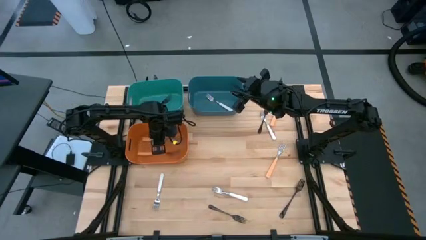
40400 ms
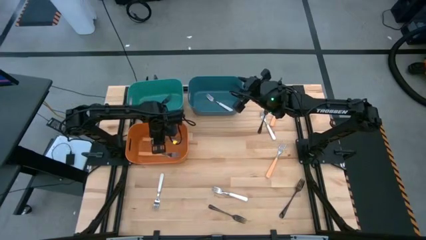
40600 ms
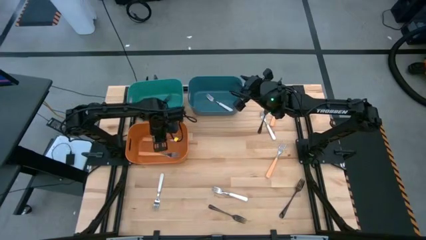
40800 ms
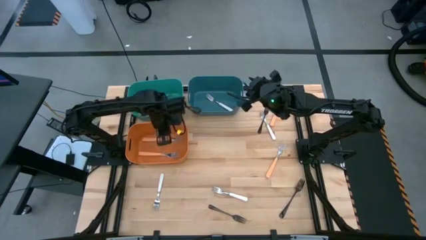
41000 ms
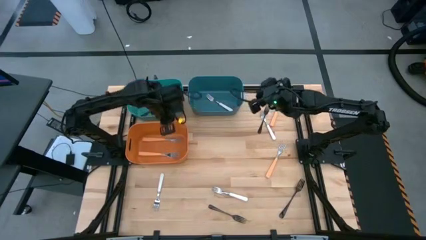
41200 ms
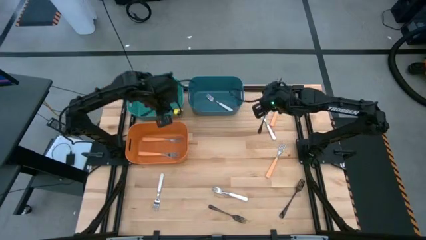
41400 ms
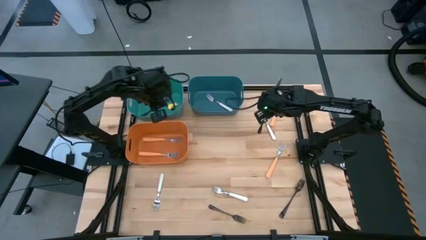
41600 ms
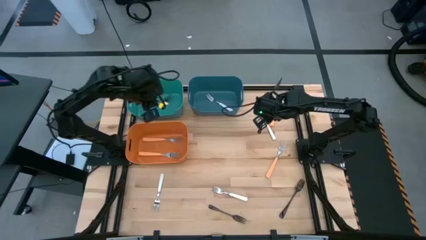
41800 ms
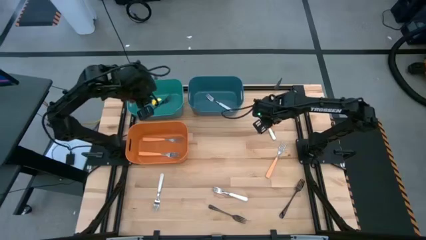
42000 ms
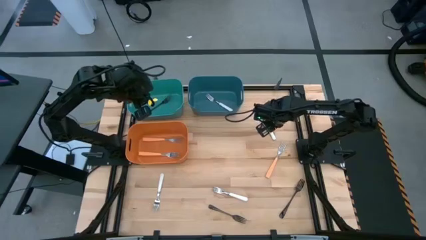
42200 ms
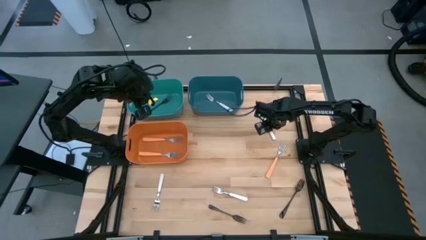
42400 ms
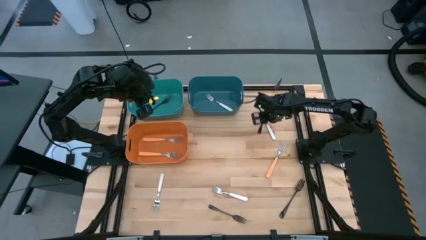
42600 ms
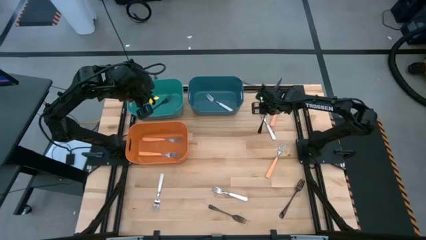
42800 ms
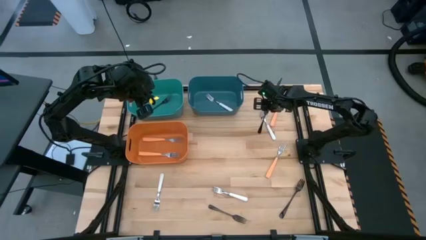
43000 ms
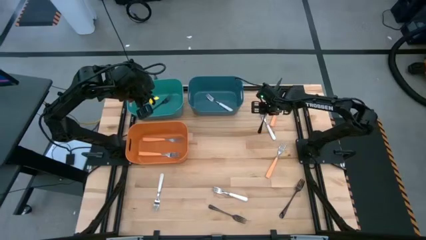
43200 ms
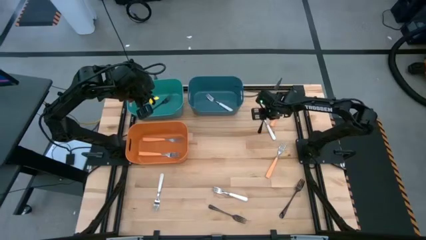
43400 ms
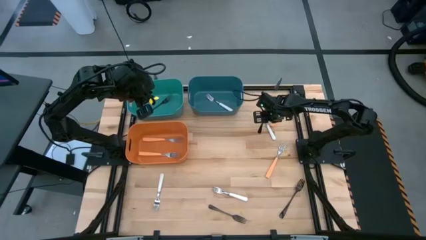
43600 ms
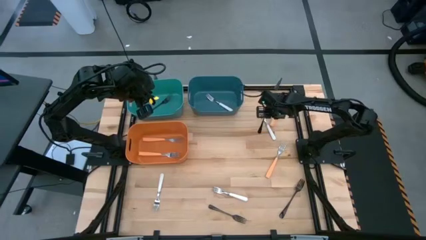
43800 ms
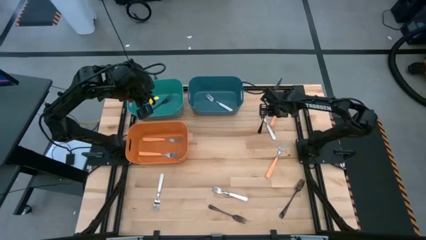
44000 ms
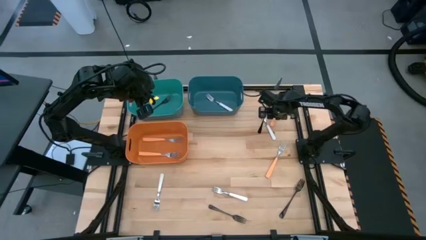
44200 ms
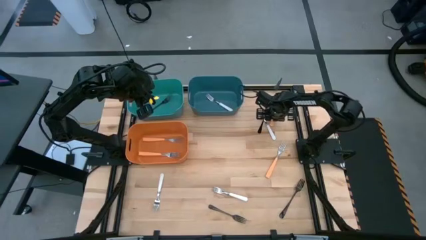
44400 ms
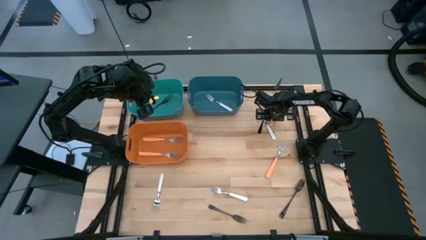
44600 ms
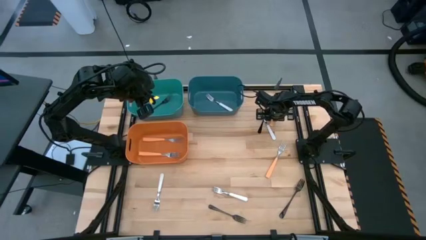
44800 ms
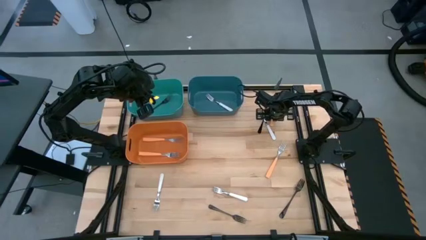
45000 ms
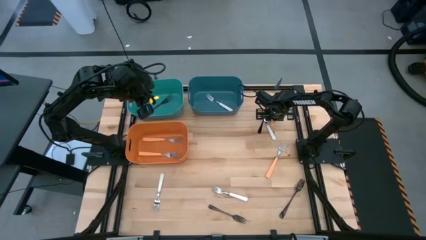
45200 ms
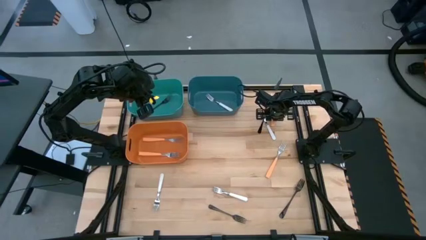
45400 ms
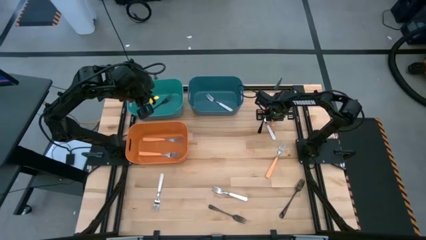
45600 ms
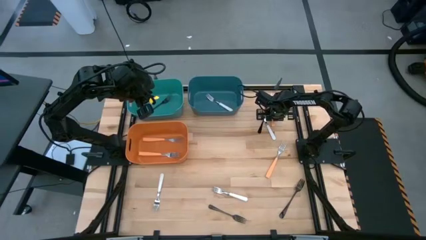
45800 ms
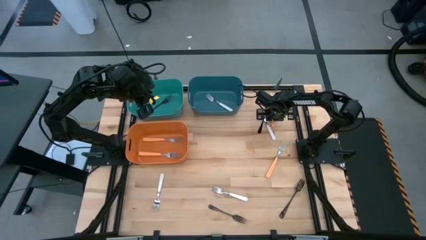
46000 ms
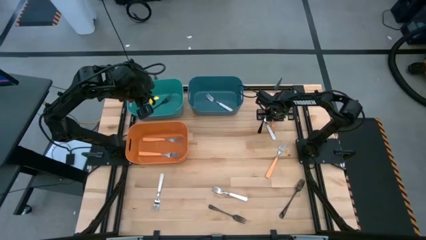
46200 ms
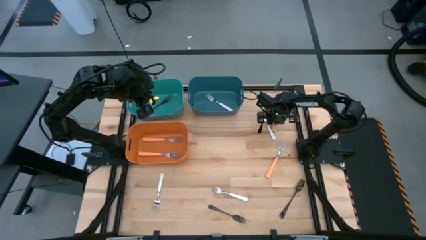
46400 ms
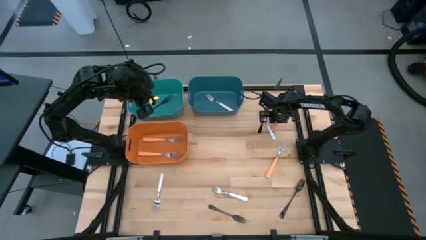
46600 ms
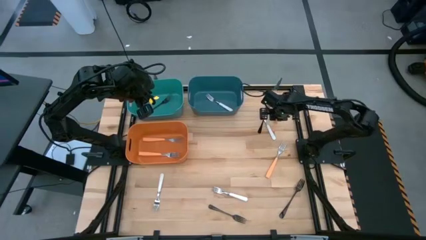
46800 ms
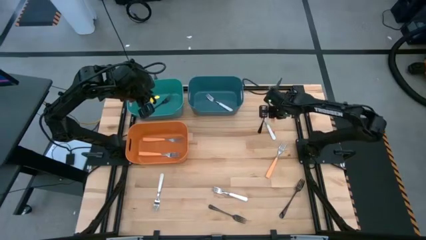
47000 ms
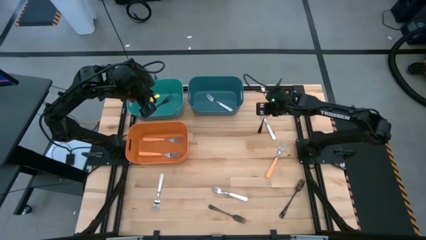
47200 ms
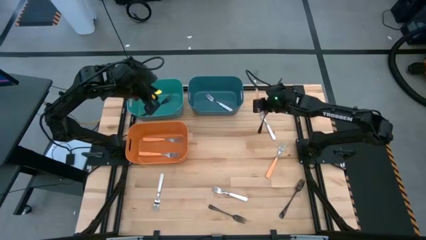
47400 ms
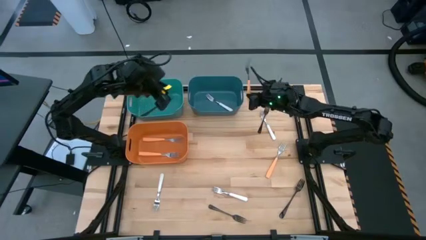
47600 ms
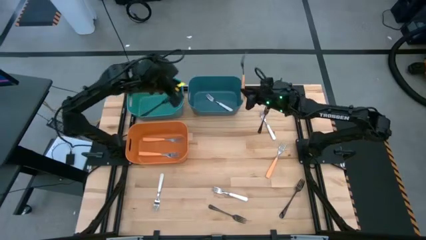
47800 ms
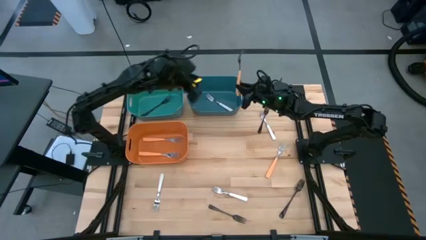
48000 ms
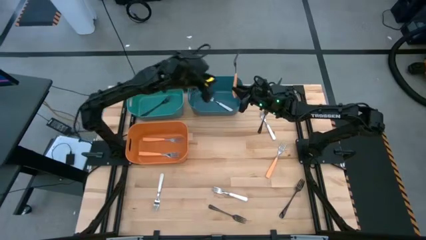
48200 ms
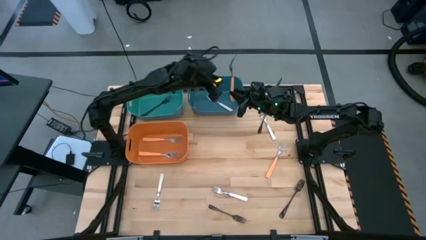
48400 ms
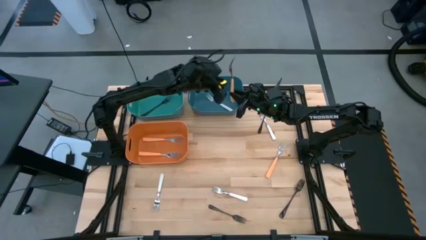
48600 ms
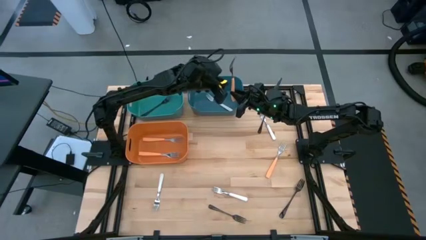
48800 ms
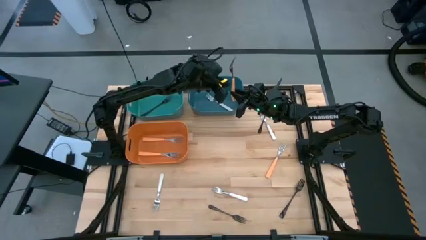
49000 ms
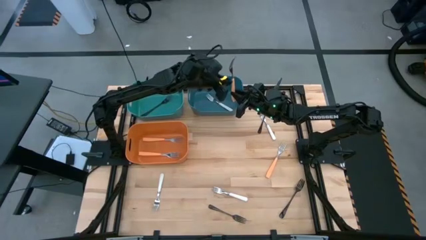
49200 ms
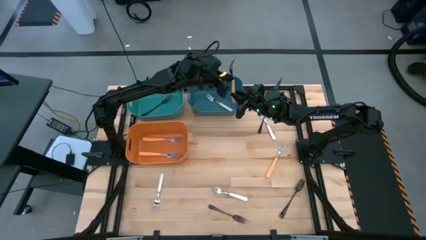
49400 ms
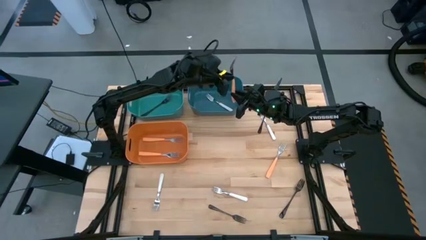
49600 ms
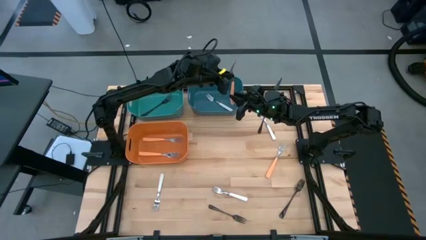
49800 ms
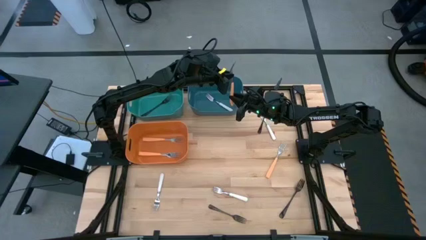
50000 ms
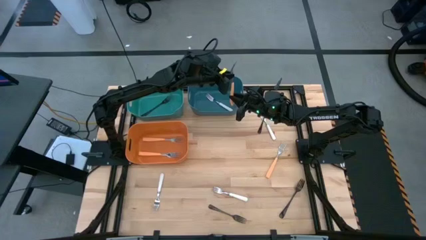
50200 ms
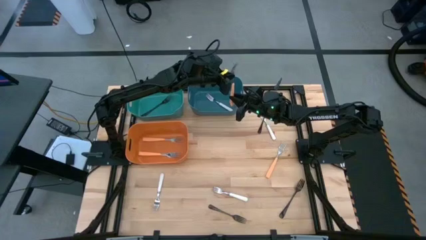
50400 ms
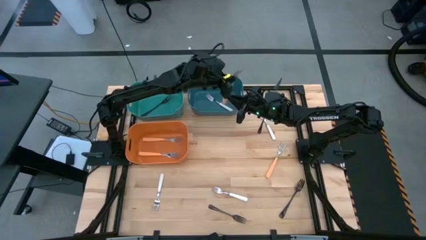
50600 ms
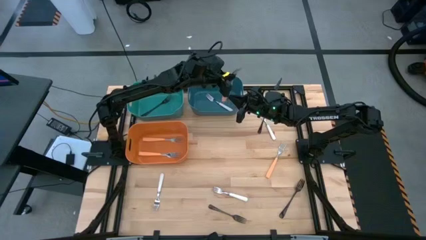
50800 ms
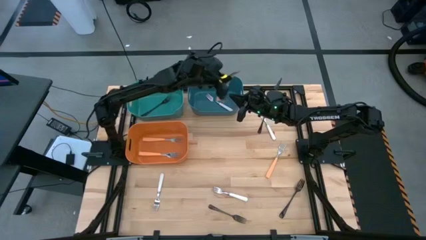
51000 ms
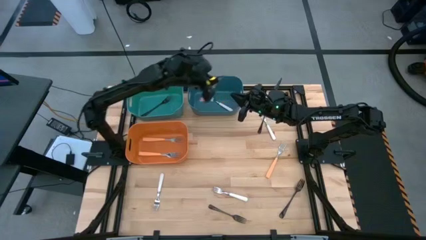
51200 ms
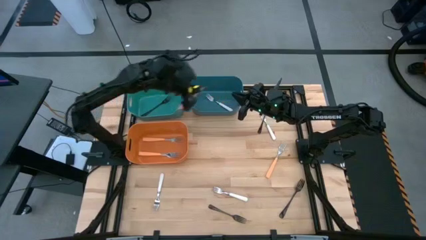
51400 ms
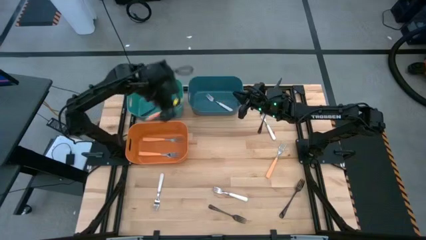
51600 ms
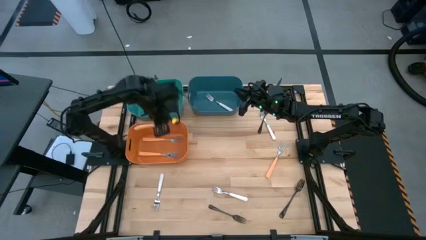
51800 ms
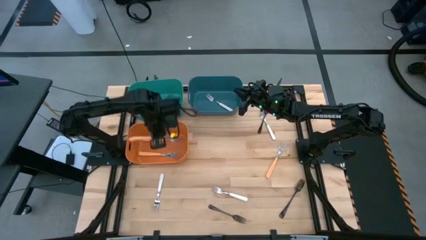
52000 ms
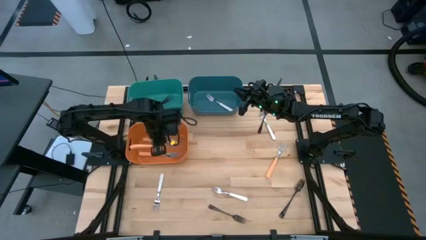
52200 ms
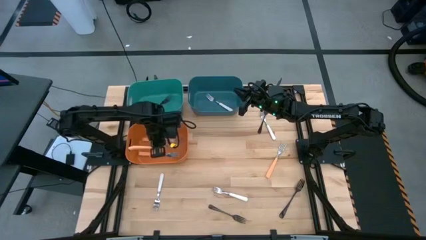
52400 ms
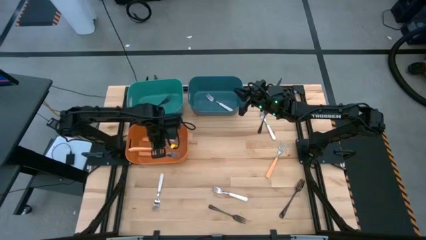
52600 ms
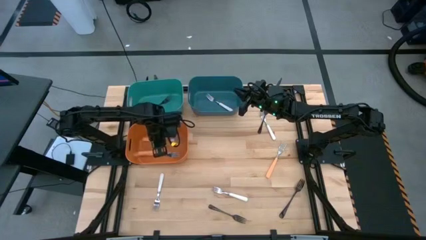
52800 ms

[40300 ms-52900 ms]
Task: Sort silverware by color (type)
Put the orange fork into the orange bin

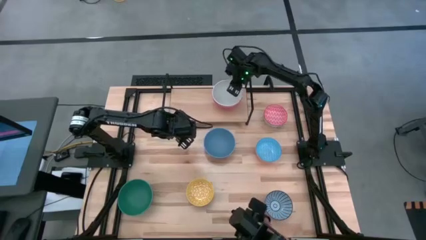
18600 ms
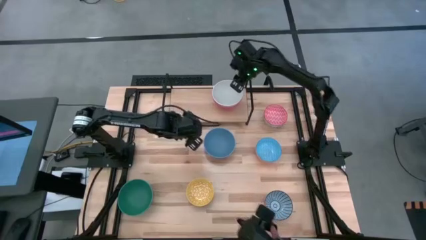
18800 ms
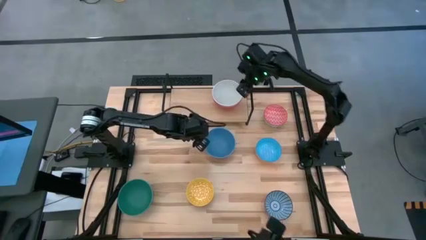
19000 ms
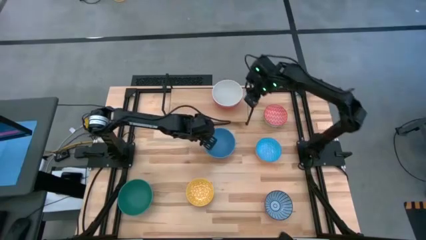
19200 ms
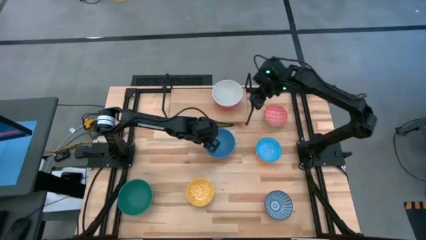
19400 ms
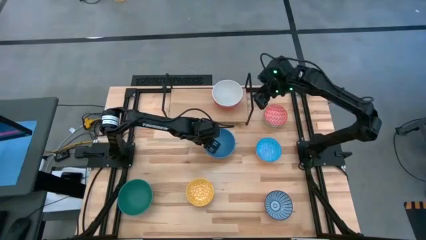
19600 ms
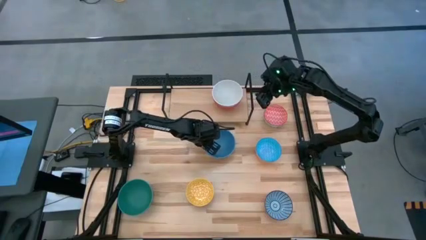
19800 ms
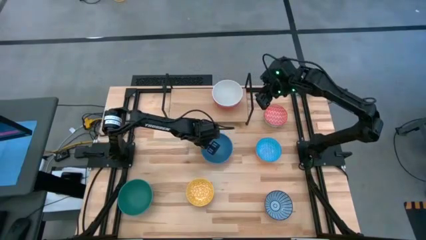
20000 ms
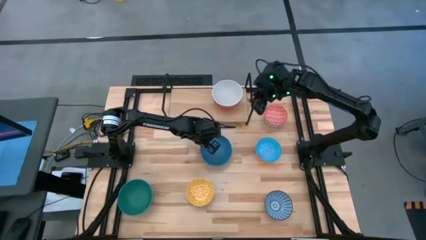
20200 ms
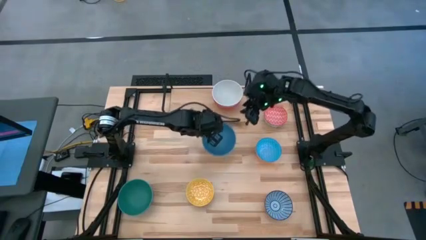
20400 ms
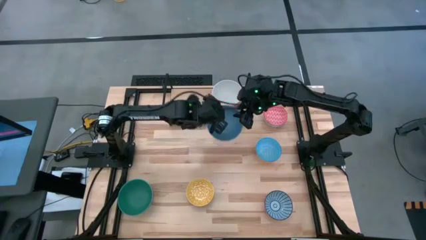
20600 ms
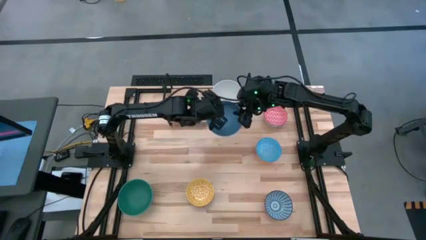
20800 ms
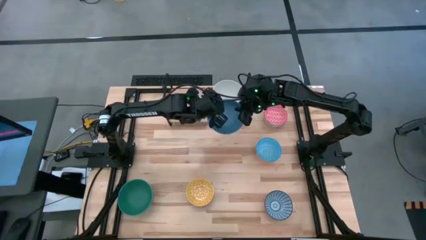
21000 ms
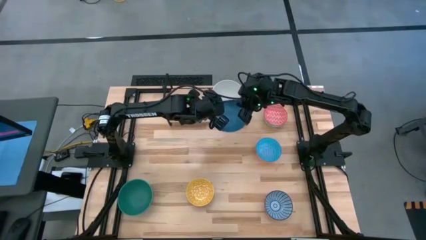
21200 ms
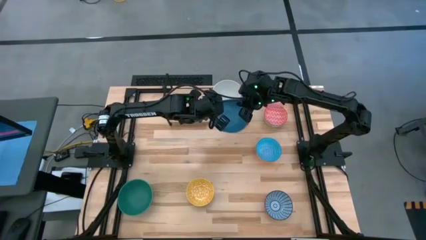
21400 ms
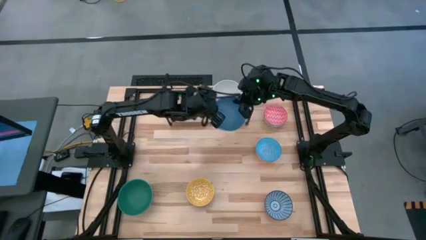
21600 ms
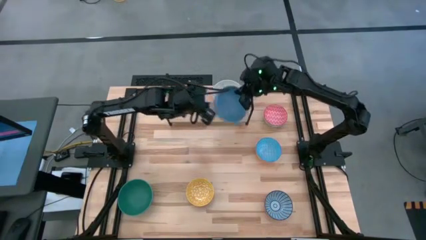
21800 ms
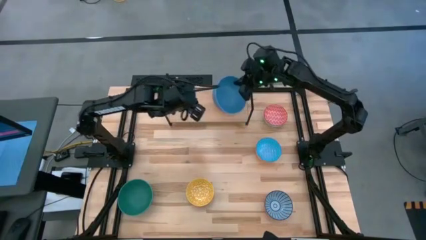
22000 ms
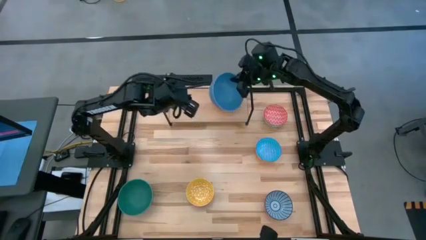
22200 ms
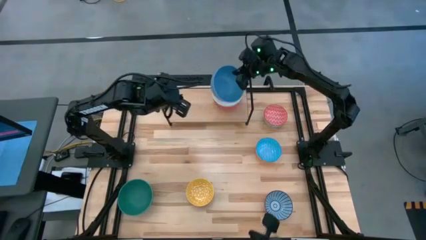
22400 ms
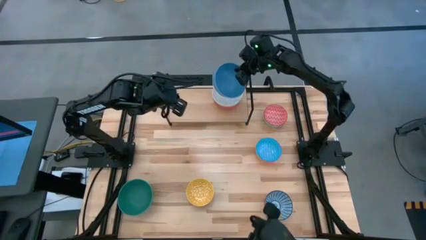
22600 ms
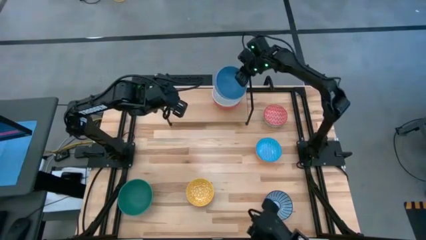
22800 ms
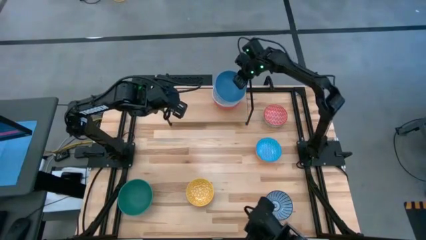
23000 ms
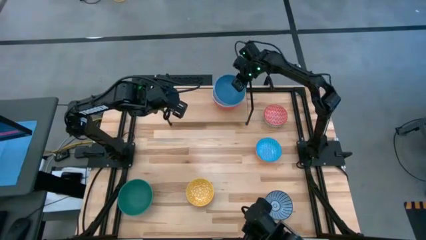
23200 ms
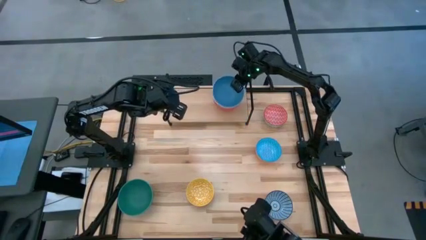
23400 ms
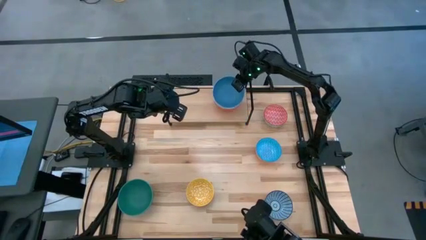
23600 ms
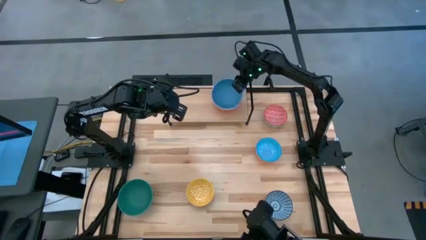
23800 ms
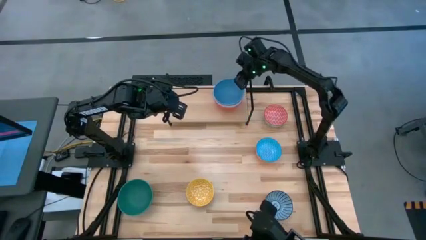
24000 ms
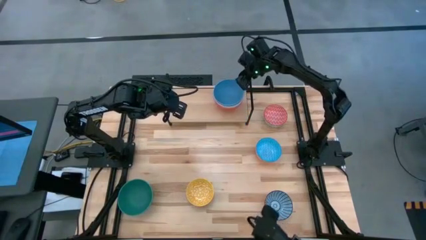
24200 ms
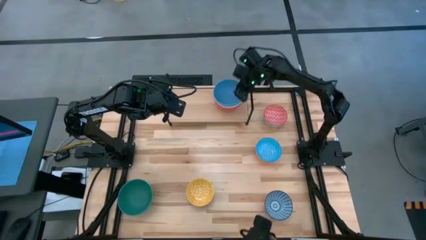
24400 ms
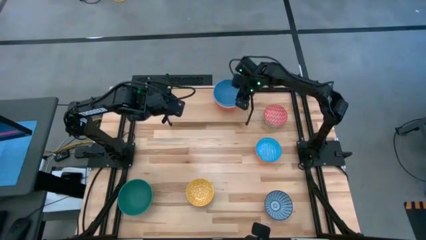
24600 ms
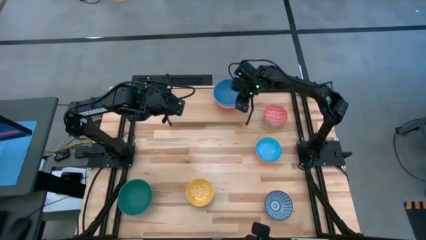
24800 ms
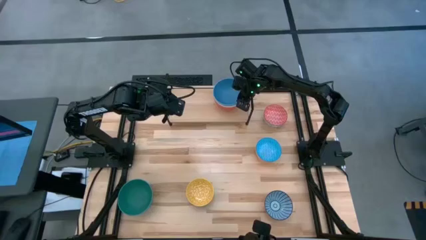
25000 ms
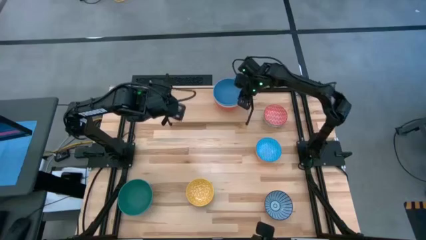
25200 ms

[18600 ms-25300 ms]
Task: Place and stack bowls onto a shelf
Stack the blue bowl on top of the gray bowl on the shelf
